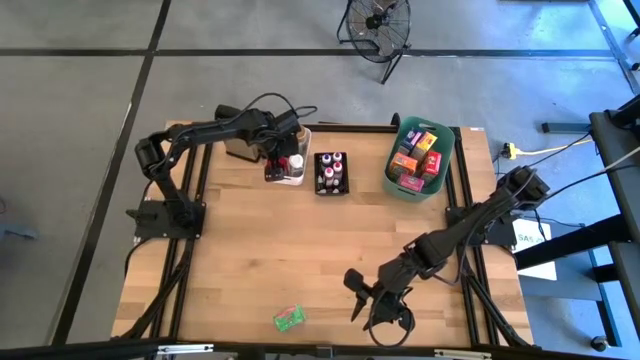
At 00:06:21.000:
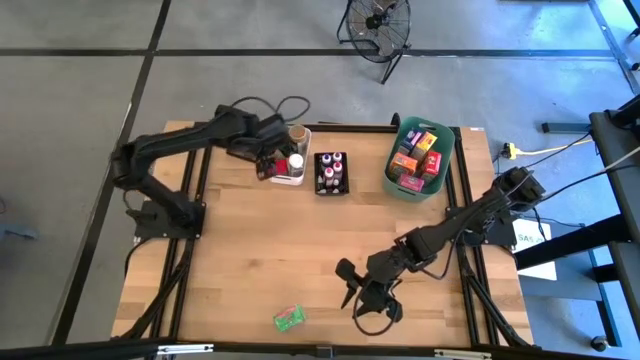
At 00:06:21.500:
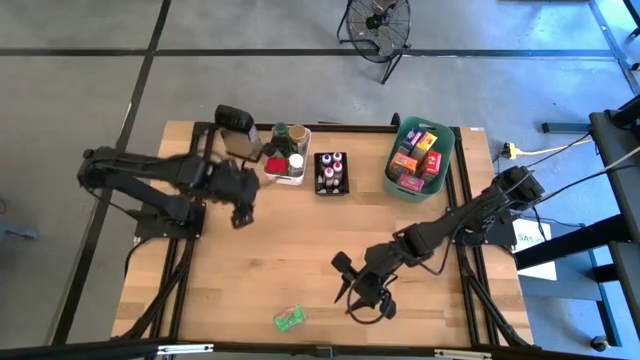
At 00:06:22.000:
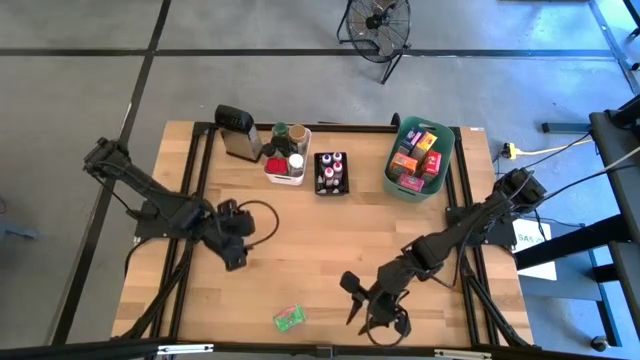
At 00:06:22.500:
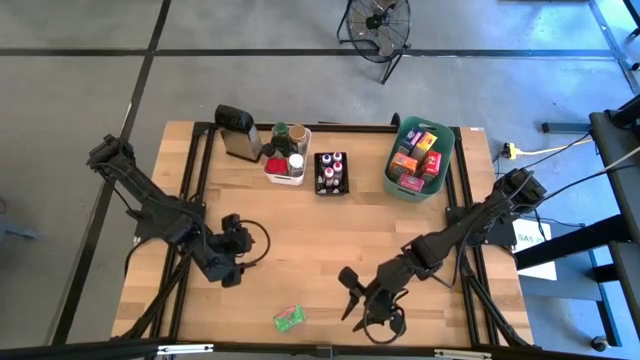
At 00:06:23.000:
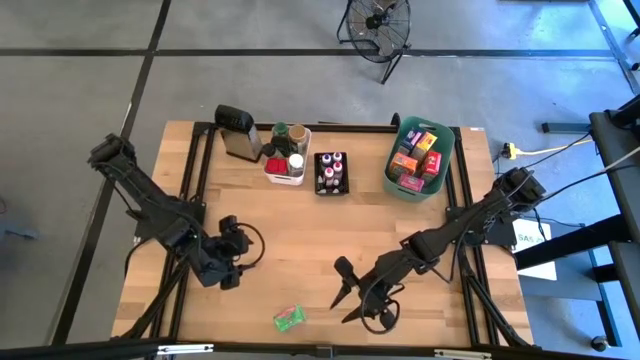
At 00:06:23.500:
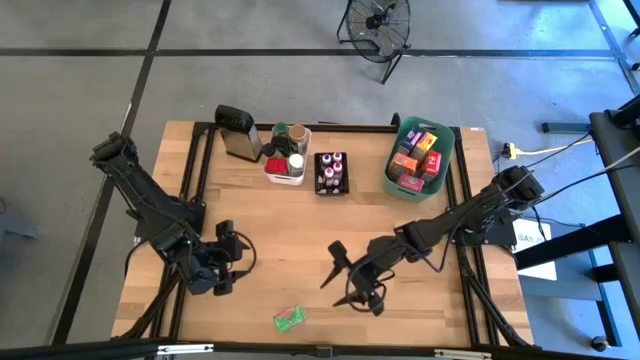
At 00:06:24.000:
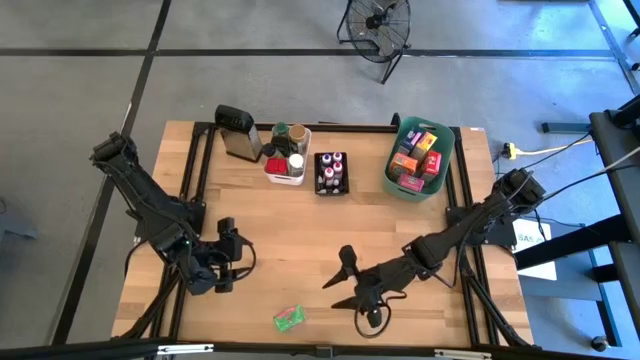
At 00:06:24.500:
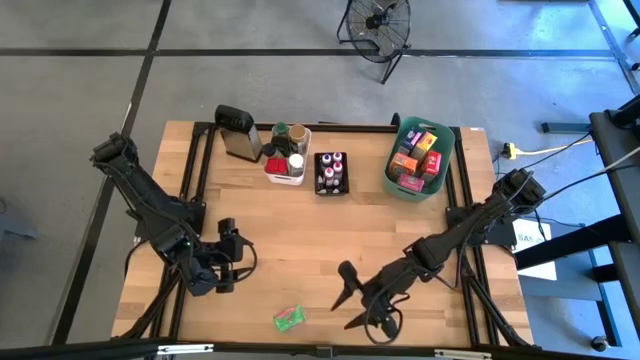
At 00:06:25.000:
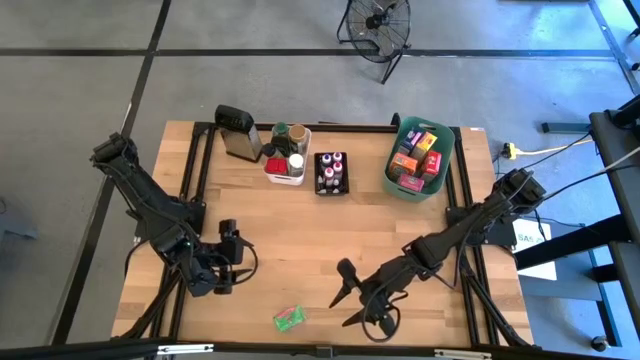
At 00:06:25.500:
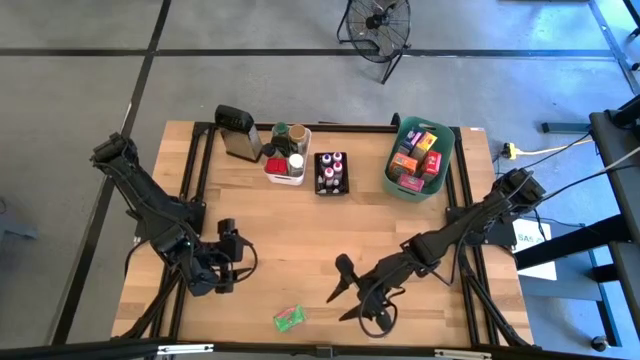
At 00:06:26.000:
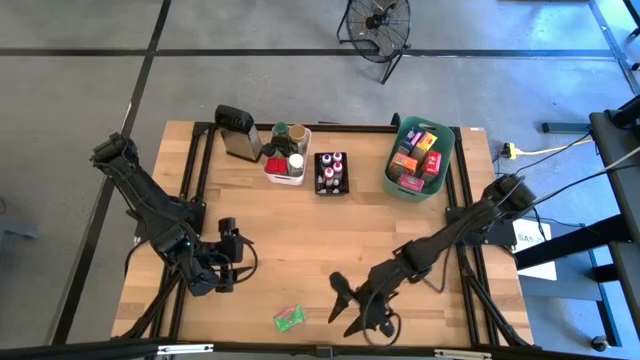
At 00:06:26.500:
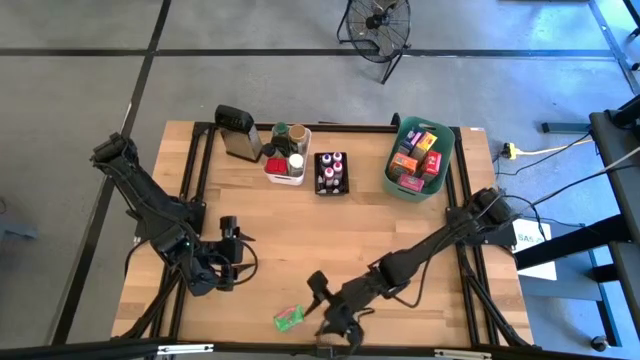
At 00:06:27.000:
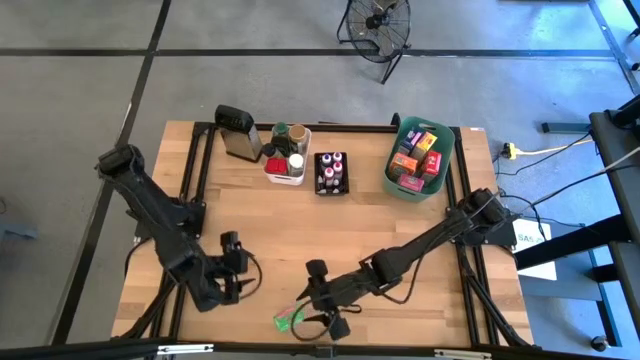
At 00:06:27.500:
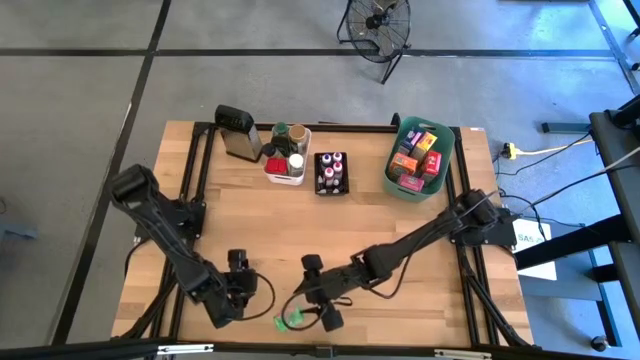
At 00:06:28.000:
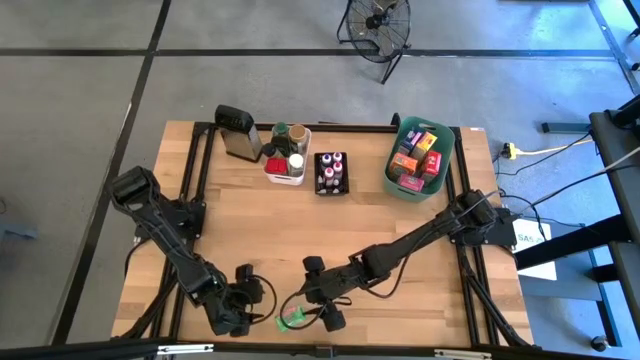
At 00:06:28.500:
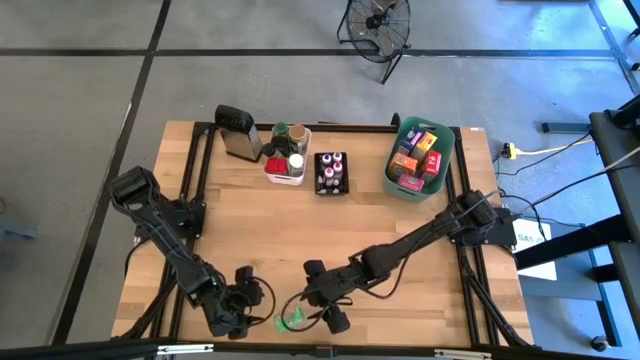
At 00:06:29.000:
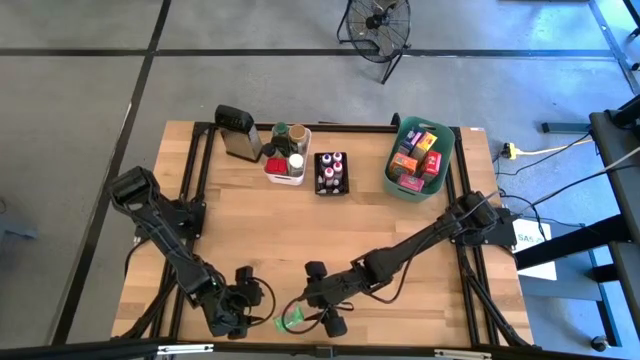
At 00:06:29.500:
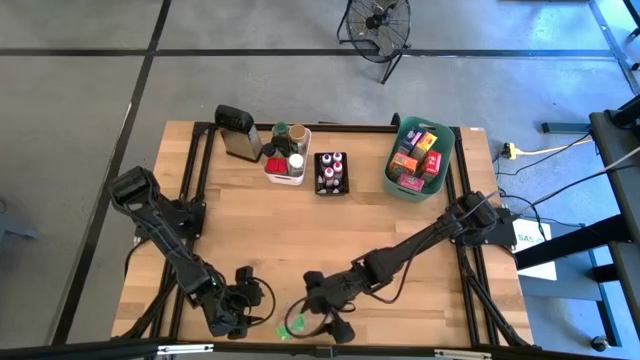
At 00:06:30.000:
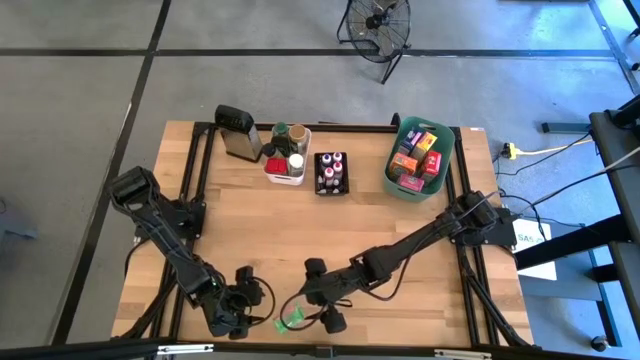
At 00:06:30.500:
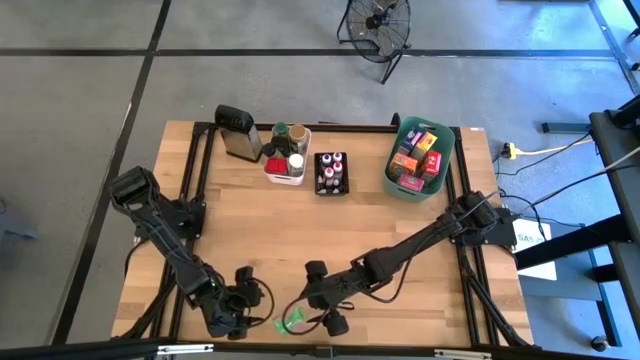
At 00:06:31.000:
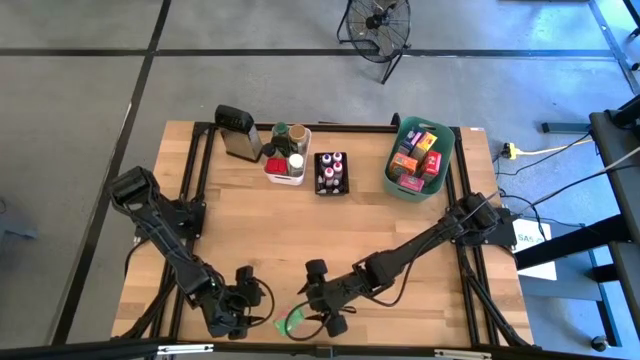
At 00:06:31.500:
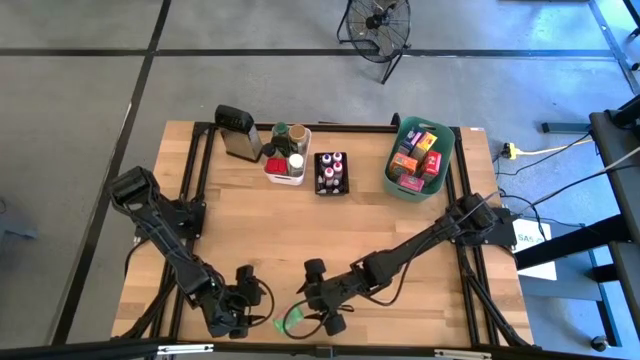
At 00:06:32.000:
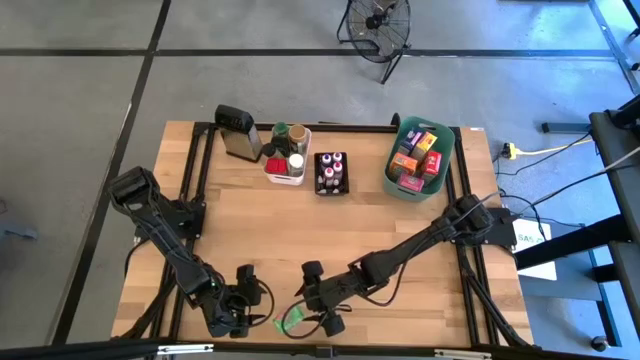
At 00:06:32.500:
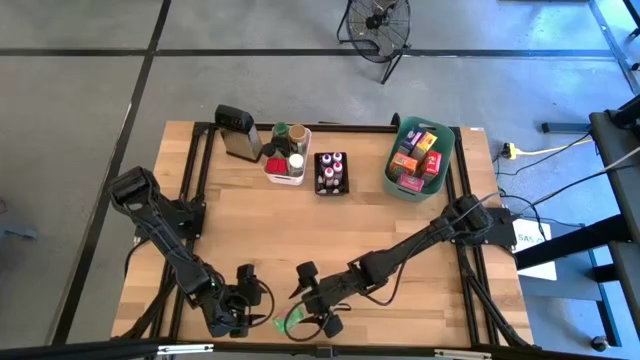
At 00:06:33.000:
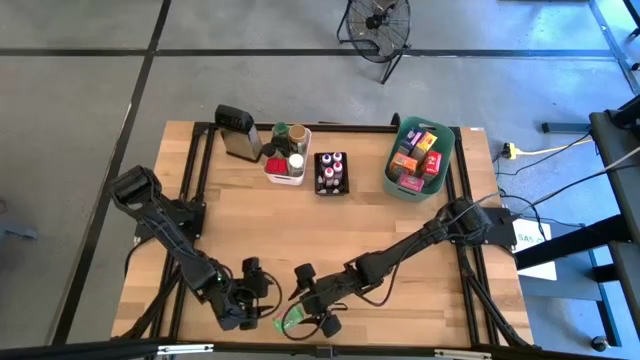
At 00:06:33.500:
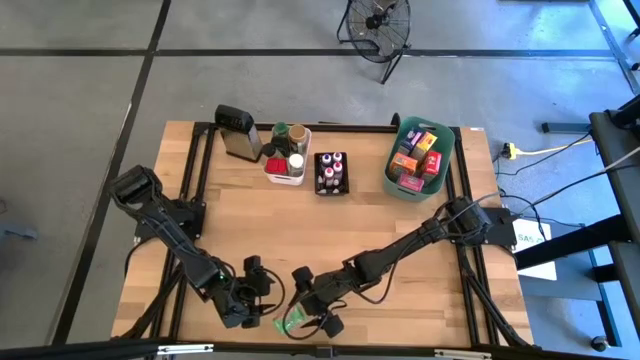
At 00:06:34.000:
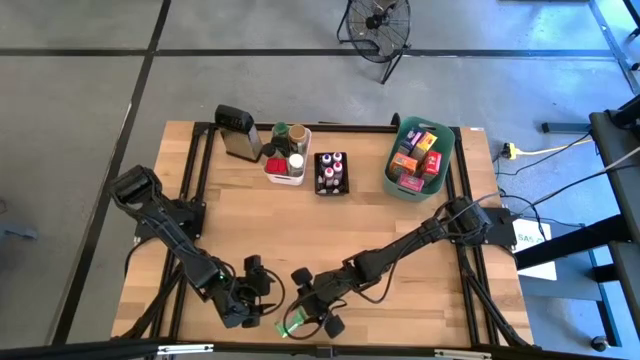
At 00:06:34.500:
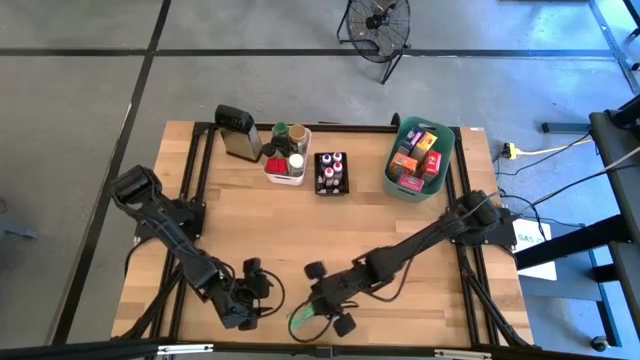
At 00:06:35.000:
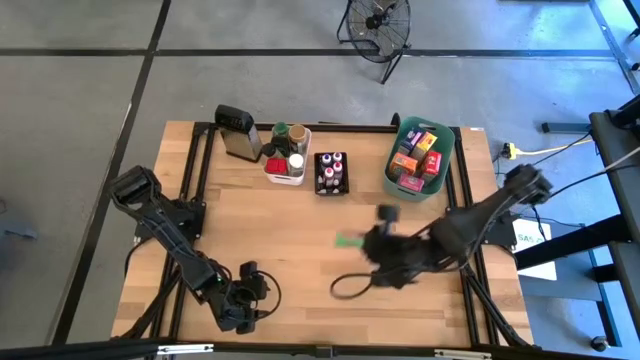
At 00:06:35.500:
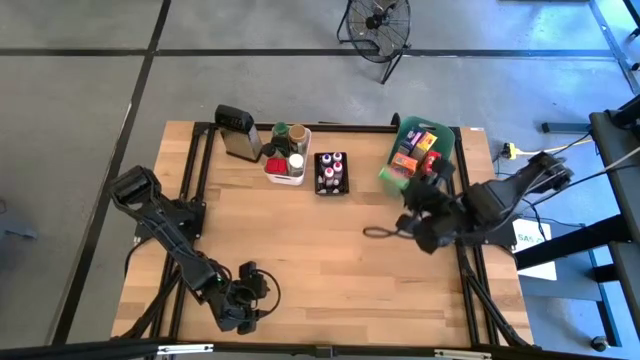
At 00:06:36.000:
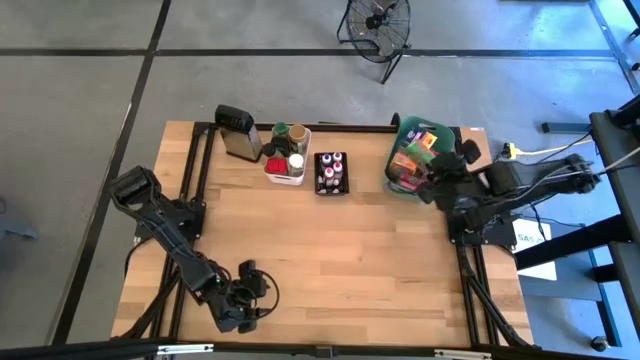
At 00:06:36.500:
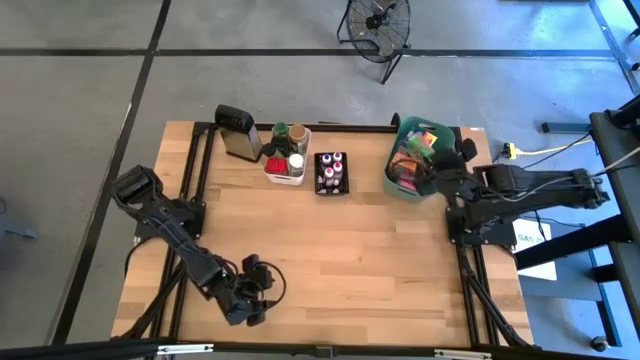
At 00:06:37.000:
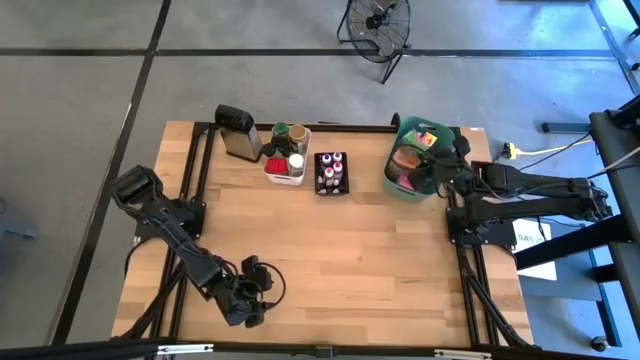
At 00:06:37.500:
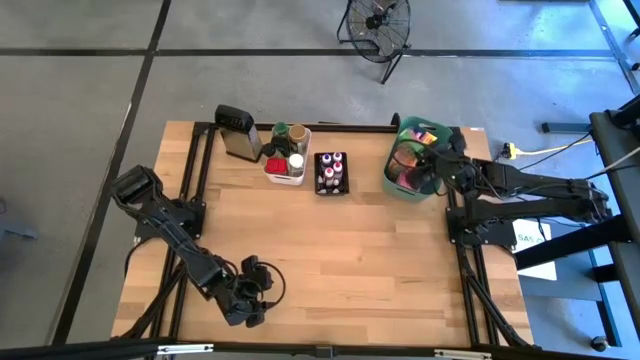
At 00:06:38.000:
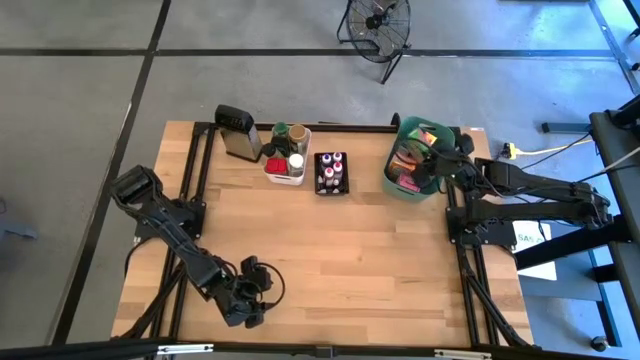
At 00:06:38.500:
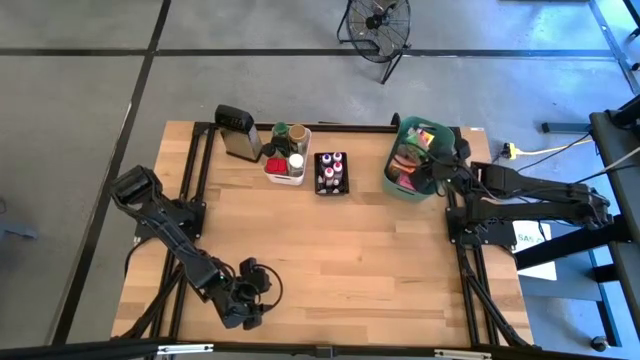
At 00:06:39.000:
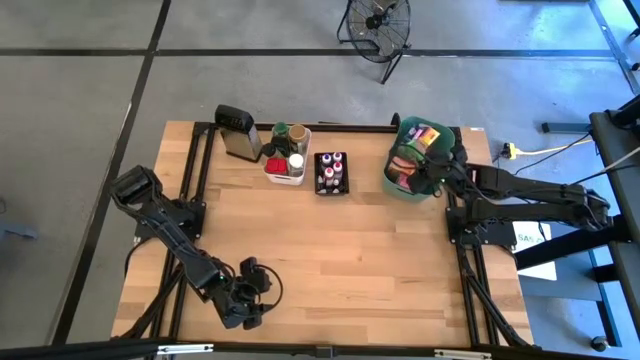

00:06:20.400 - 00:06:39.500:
Task: Pick & Place Kitchen Items
Put the green cereal box into the green bin

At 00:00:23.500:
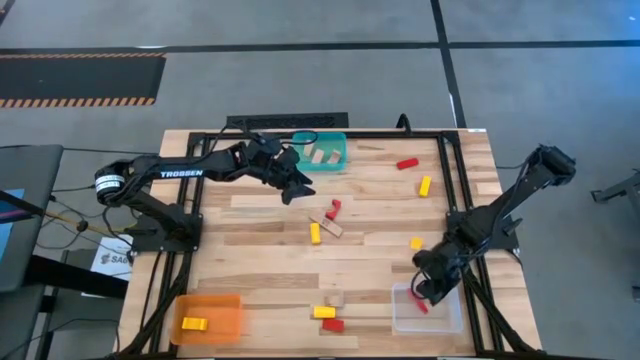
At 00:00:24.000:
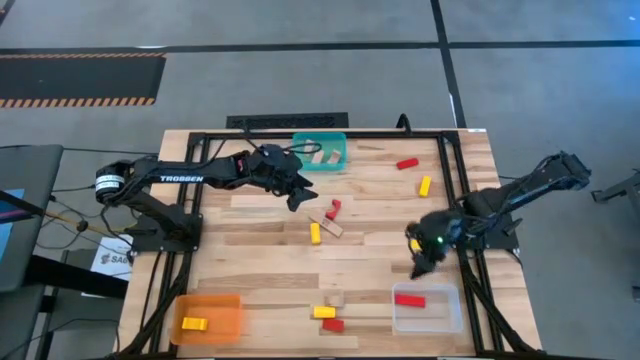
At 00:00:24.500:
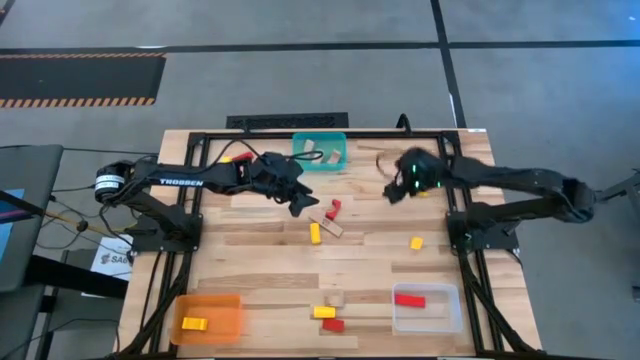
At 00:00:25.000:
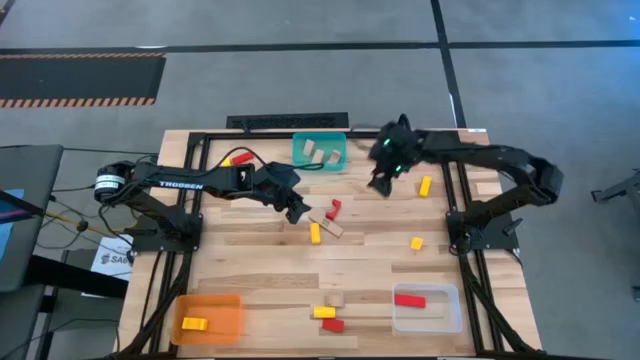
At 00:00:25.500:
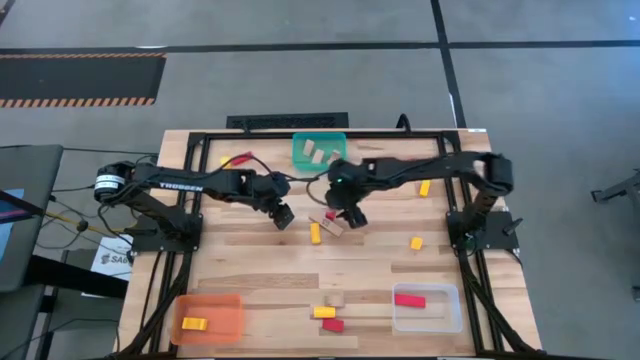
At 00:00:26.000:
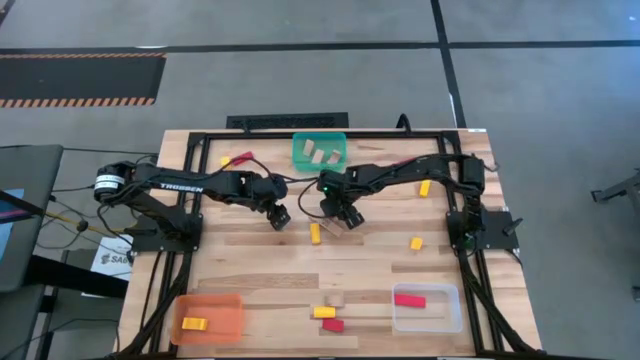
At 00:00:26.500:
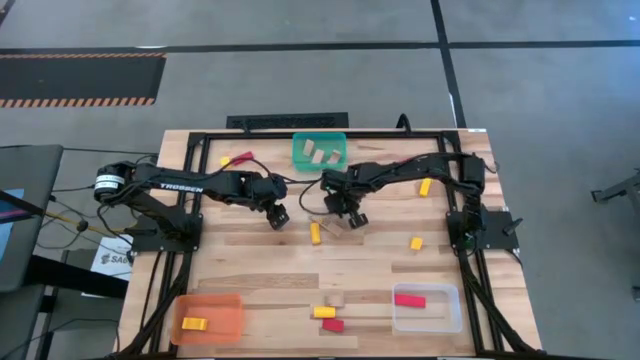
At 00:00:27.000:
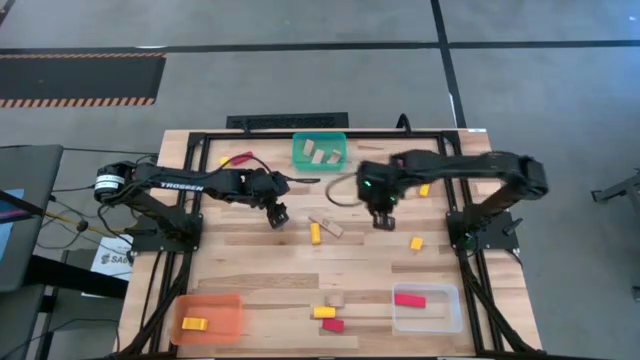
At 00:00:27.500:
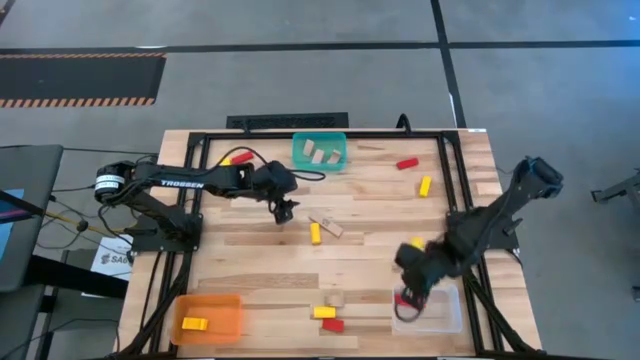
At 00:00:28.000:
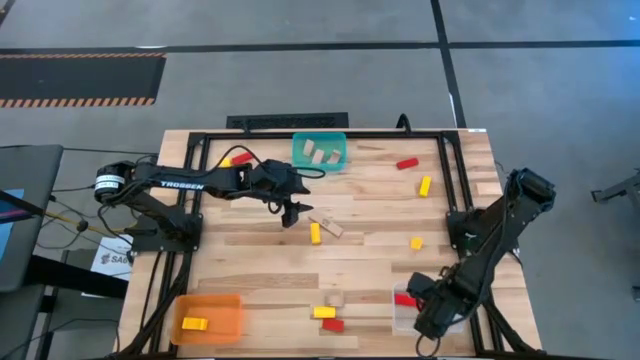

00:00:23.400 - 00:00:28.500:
Task: Sort & place blocks by color
Put the red block into the transparent bin
